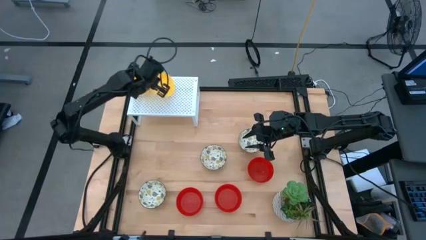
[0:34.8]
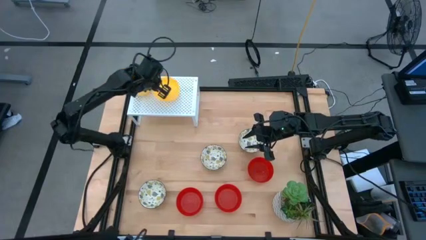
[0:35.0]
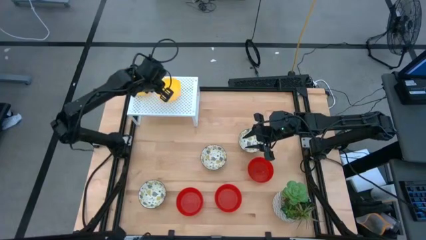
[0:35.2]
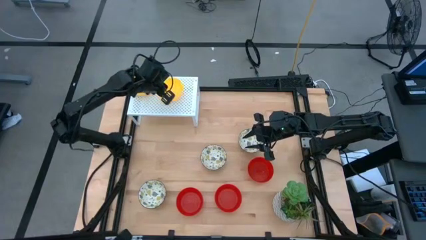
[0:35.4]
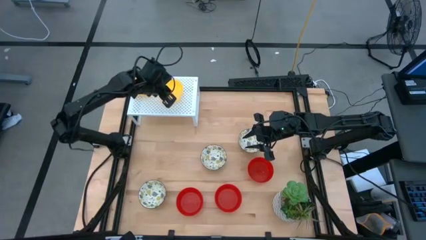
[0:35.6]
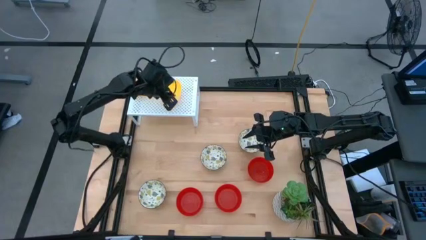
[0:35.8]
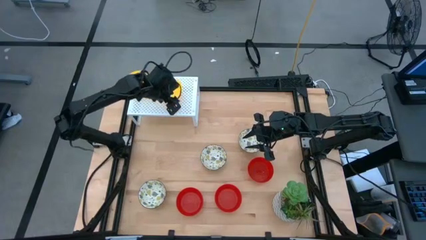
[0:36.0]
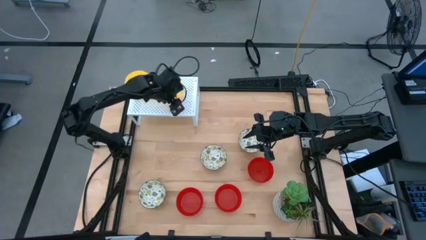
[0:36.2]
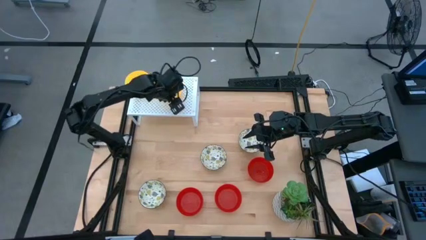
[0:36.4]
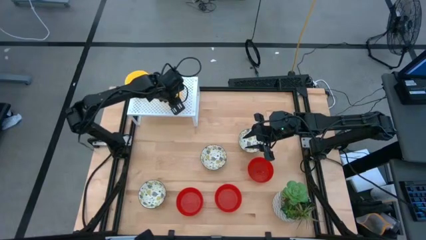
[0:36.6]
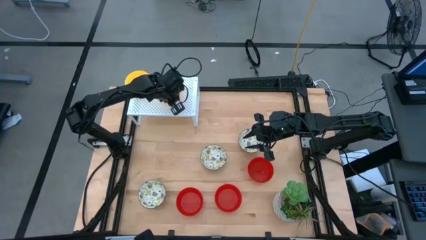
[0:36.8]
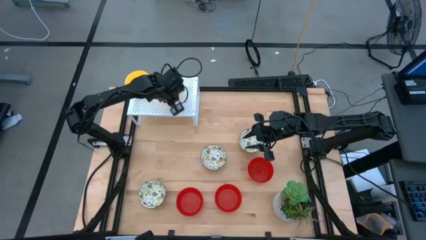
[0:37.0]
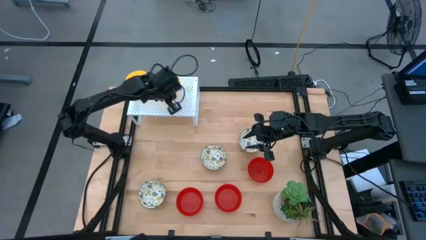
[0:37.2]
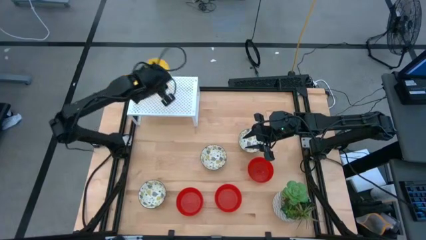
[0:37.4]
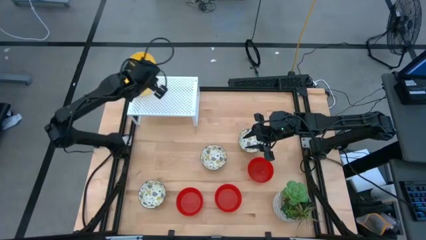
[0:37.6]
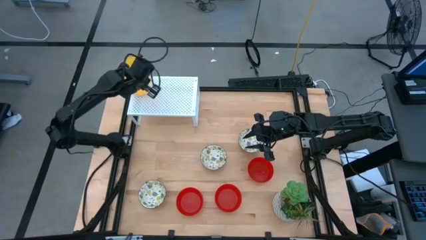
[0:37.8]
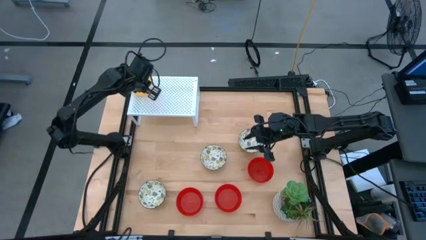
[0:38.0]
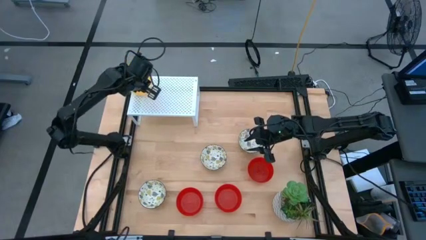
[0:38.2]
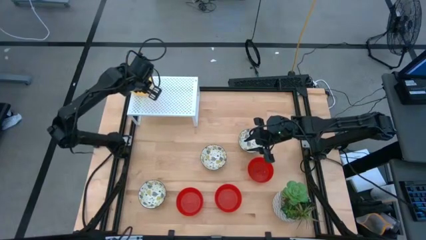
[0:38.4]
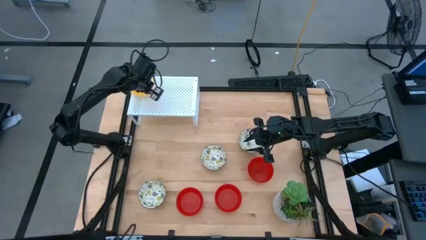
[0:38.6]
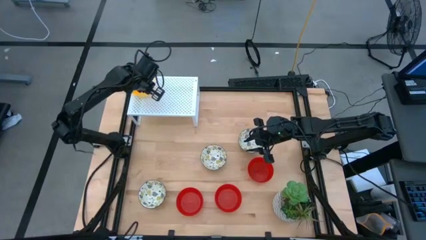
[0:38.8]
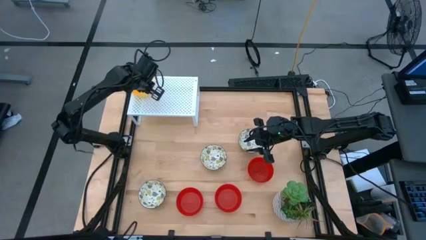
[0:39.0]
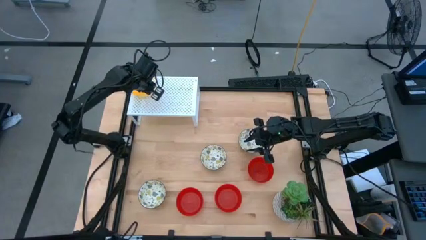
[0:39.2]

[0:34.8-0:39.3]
Task: Pick & Place Mini bowls
Stack the yellow bowl on top of the other yellow bowl on the shelf

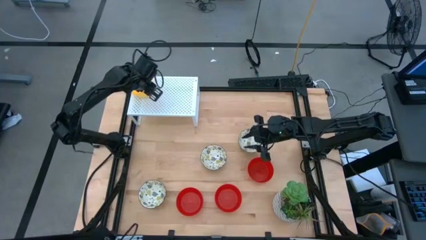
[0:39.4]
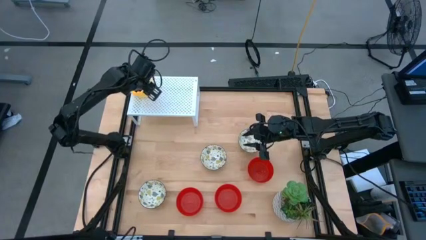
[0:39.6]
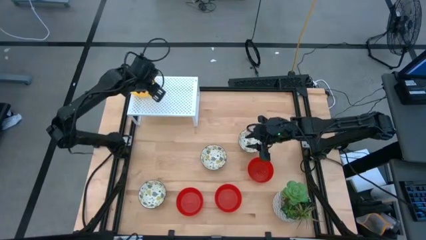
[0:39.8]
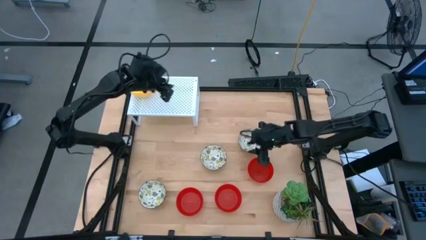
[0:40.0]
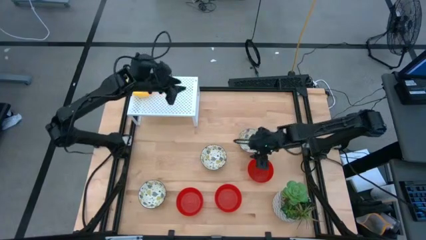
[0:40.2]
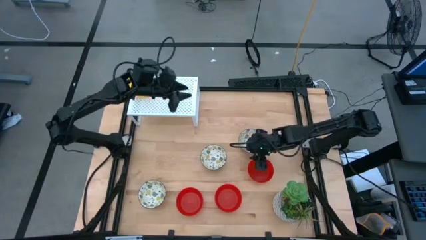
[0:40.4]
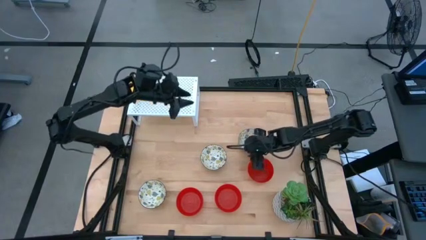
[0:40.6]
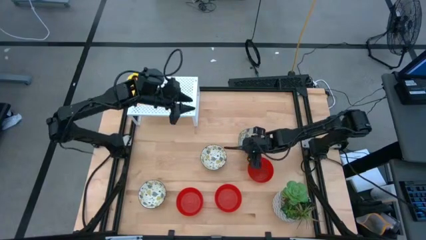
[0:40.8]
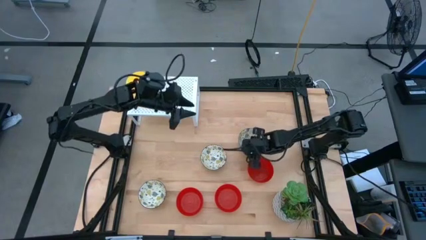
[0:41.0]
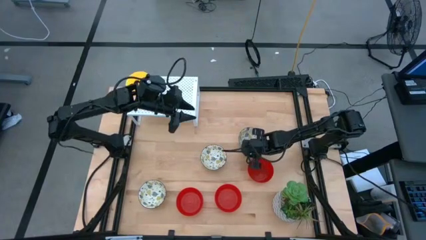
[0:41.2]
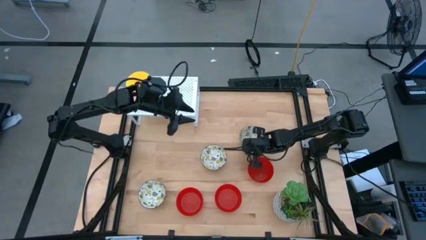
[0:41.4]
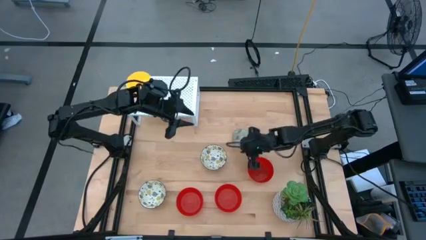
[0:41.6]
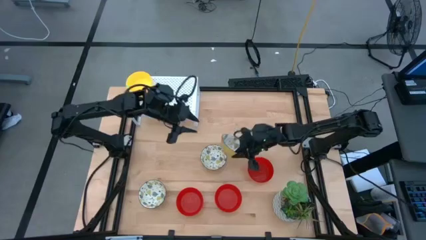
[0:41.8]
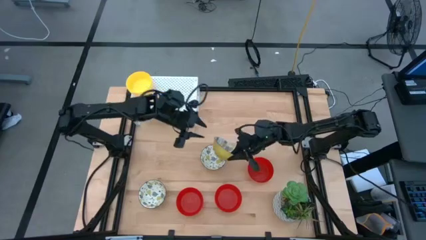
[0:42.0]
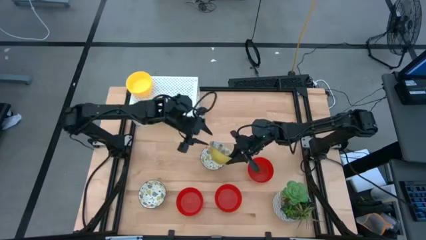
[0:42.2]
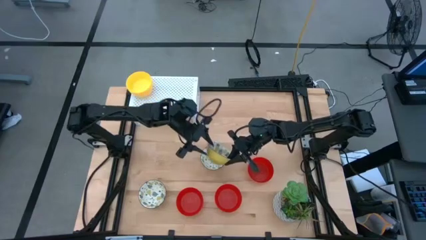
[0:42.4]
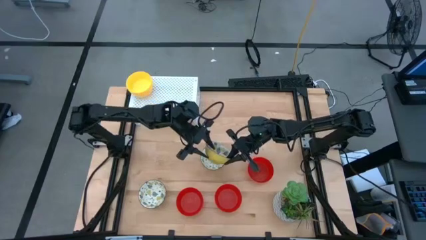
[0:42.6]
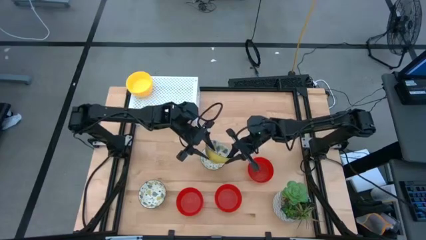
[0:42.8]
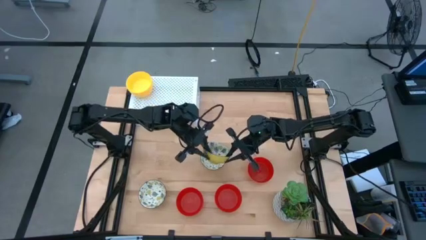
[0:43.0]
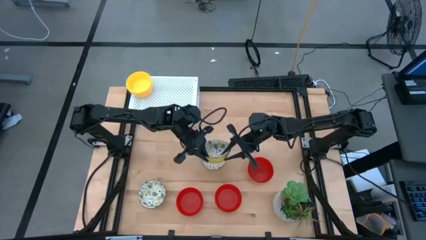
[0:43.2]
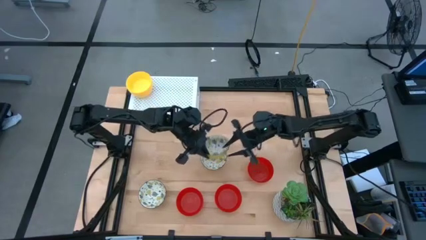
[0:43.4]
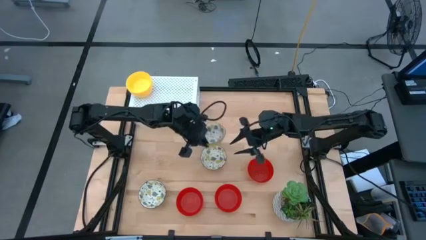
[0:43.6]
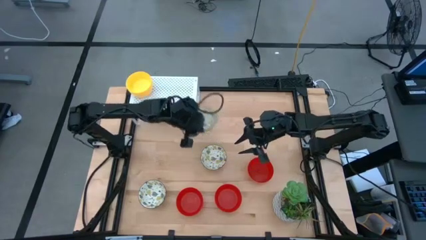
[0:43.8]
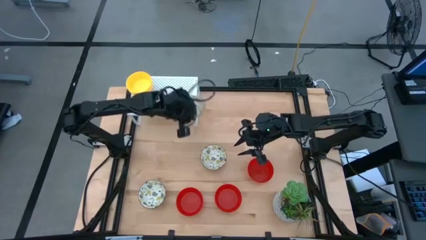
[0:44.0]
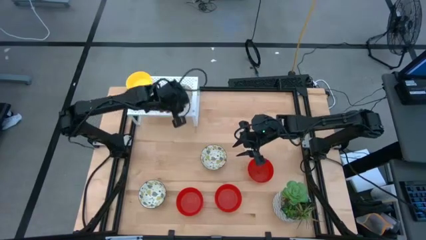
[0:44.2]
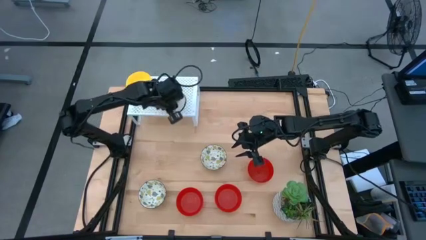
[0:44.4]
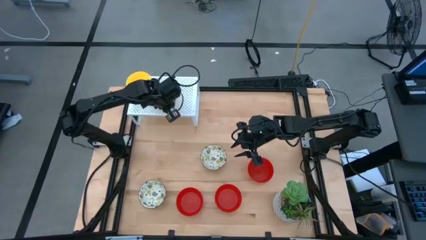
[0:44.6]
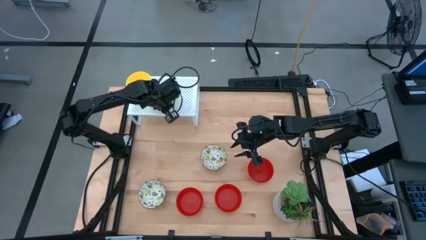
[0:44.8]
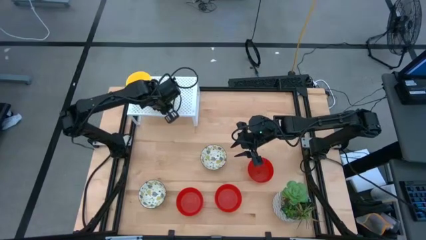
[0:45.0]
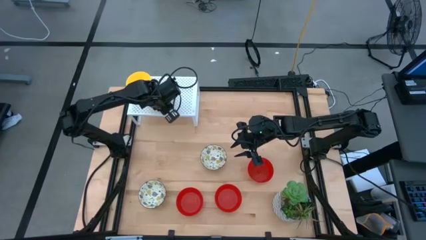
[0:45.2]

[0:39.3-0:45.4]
Put the white patterned bowl on the shelf

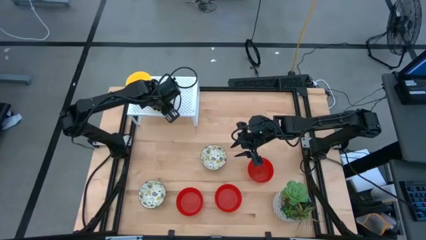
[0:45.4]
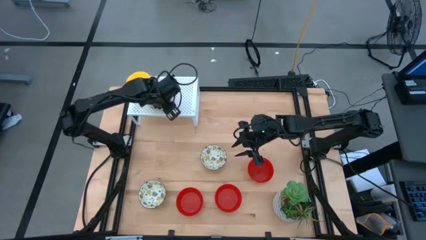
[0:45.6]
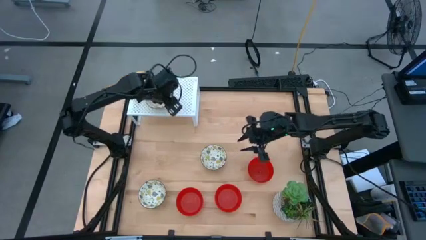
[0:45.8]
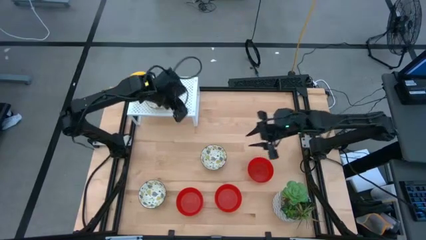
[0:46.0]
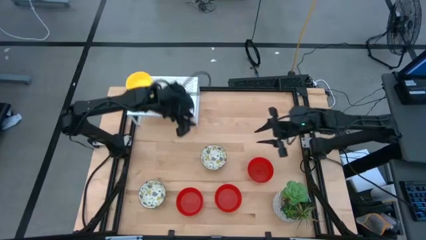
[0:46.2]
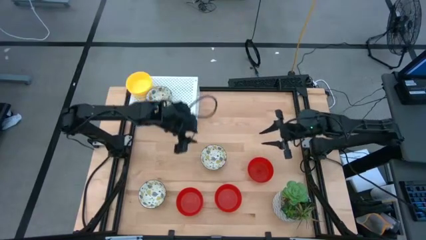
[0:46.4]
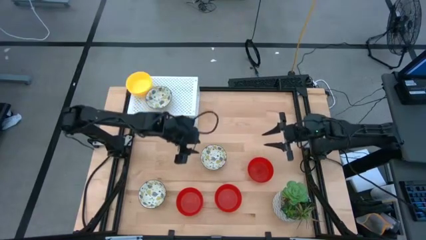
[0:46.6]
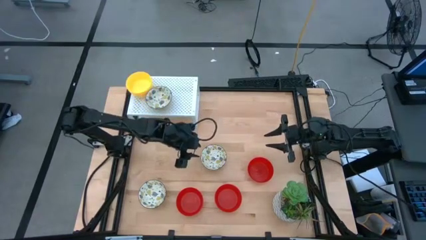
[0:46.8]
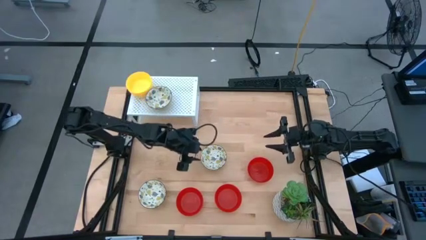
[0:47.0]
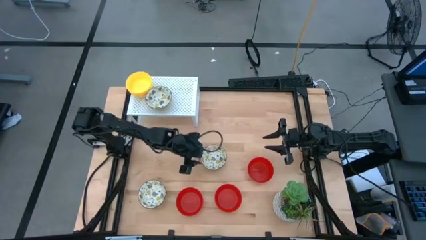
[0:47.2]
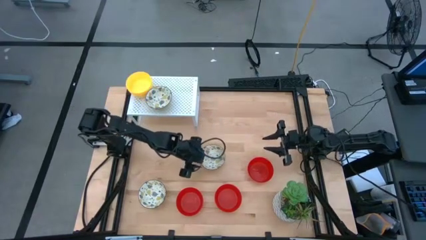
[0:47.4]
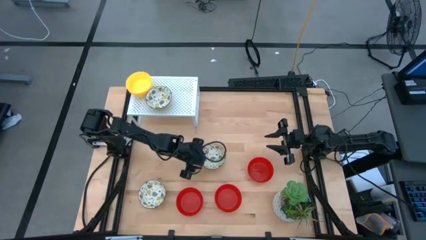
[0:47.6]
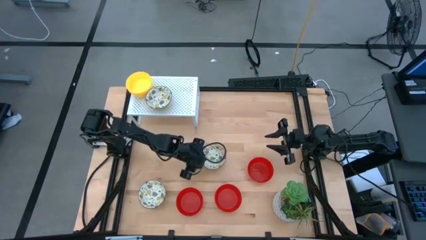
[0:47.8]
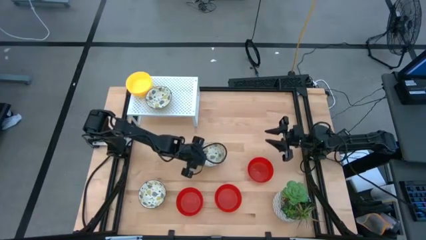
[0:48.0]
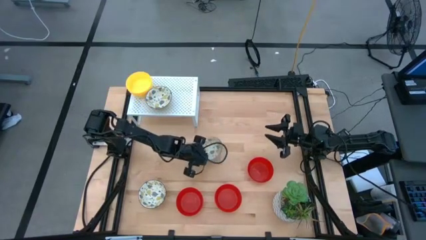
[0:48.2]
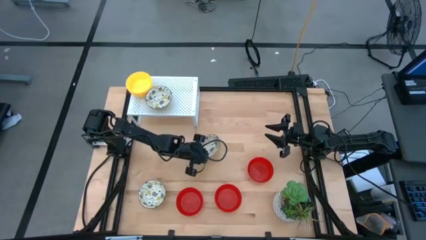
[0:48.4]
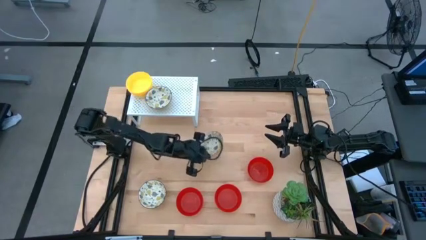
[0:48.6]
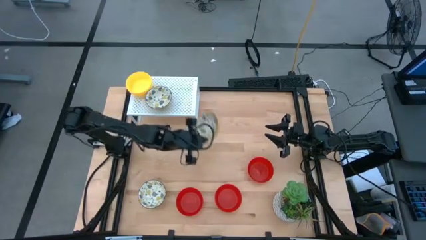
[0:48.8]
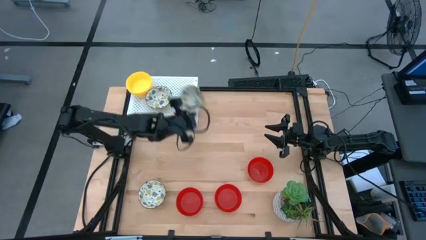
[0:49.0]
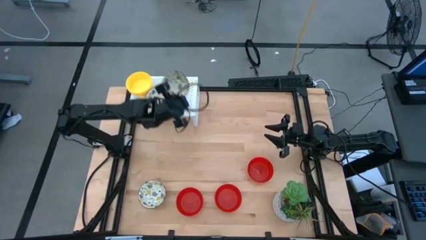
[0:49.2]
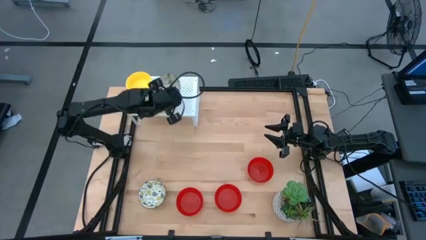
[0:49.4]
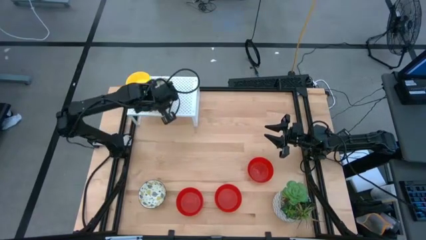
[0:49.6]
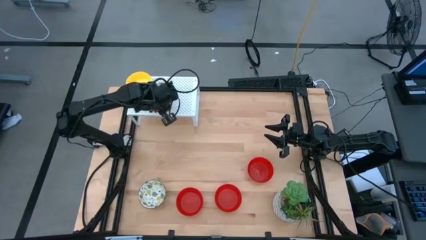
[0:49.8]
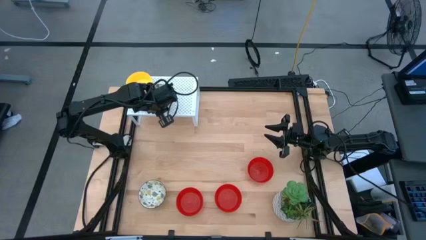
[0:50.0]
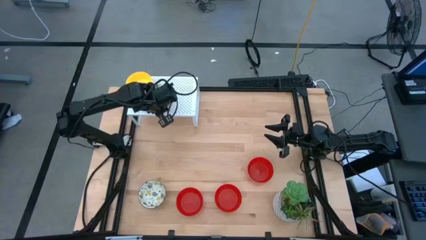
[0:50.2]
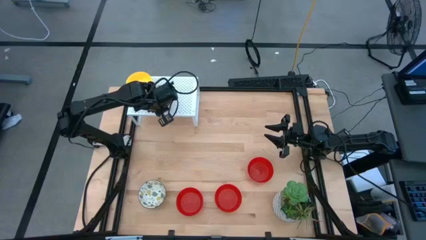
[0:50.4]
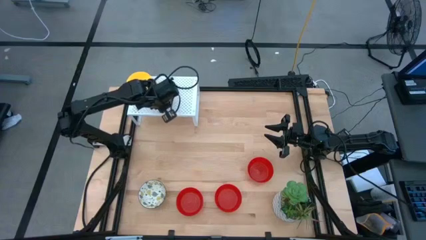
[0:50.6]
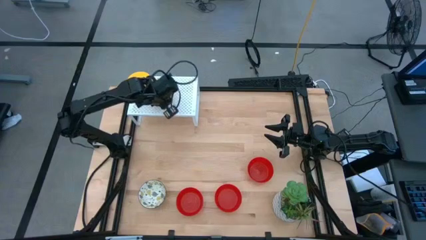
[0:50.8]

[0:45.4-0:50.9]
Stack the white patterned bowl on top of the other white patterned bowl on the shelf
